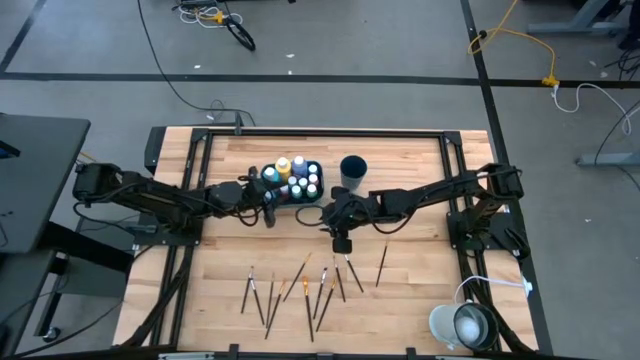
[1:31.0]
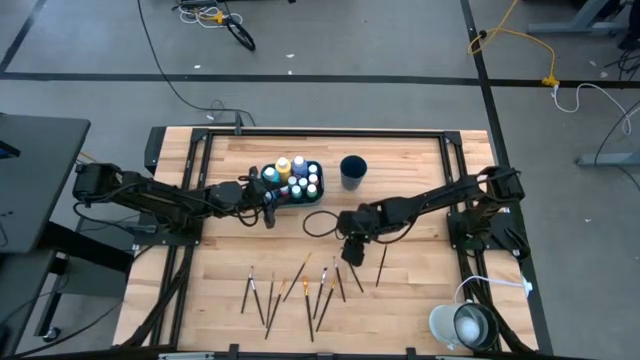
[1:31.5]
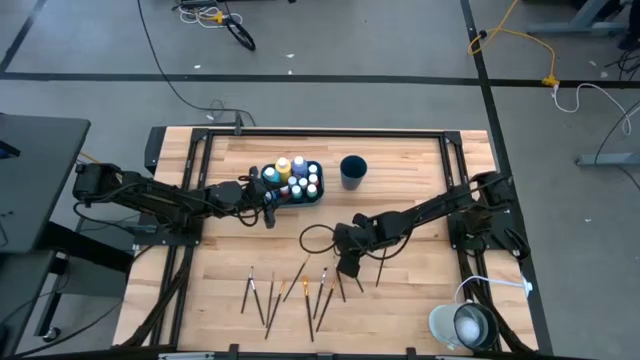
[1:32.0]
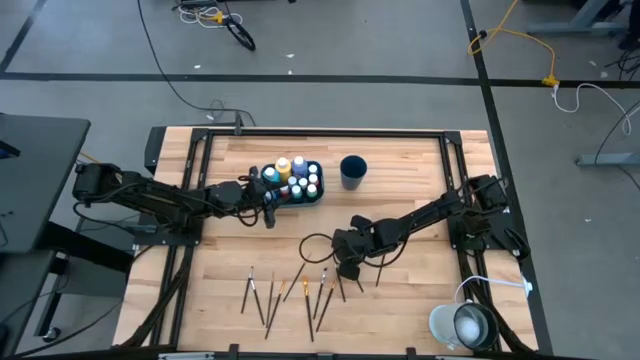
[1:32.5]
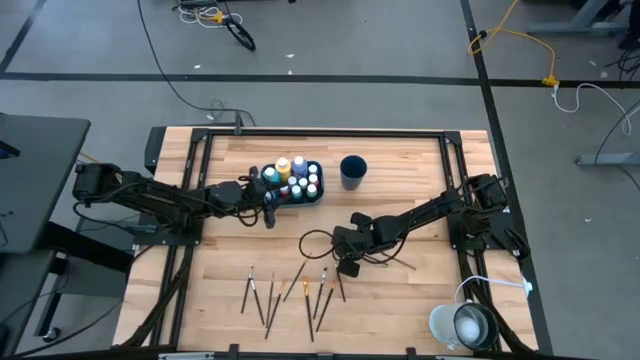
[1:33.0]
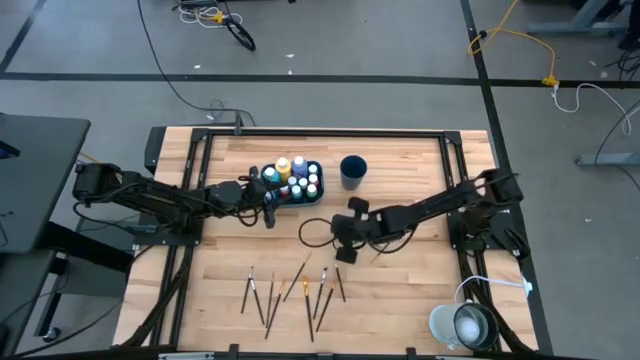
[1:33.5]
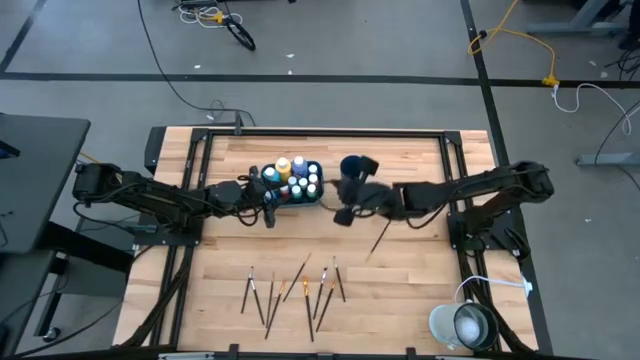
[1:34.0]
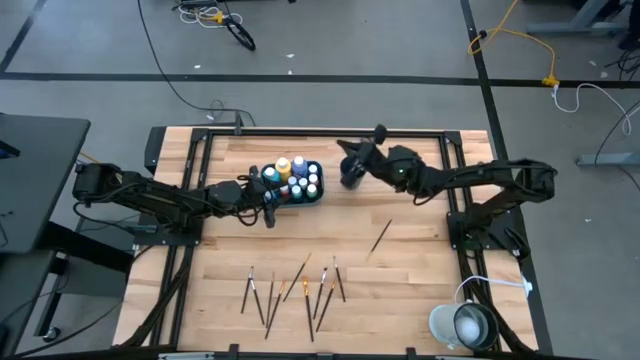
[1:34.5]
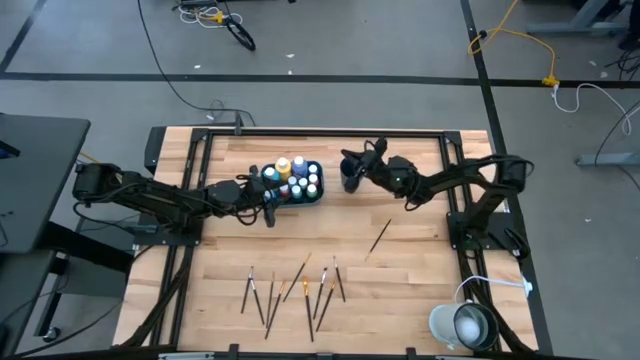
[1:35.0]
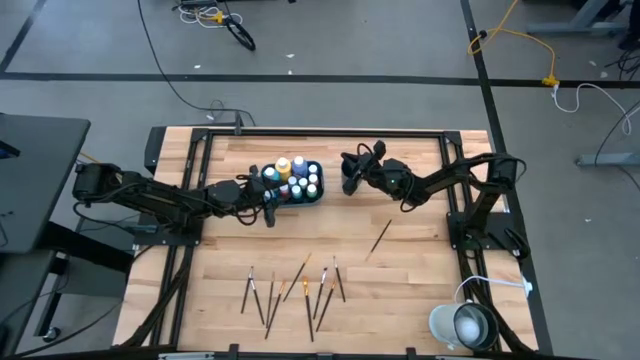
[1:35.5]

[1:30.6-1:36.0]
Task: Pick & Place Paint Supplies
Put the silver paint brush into the blue cup

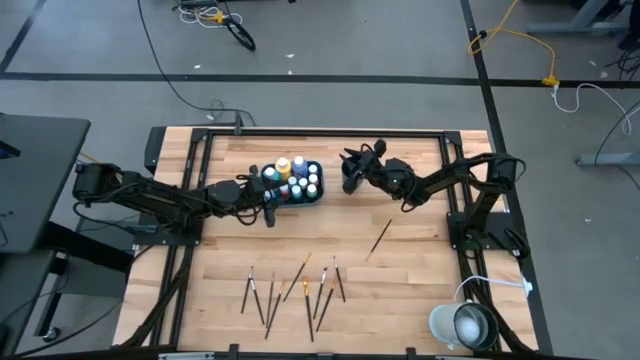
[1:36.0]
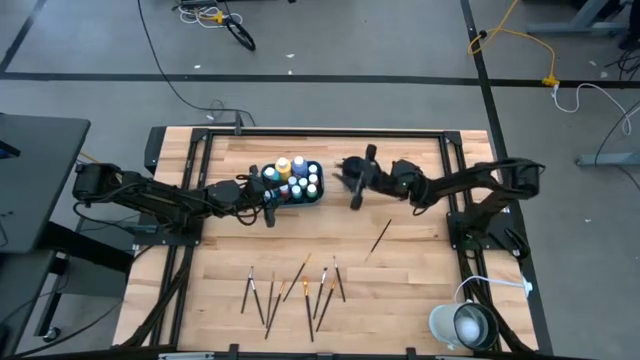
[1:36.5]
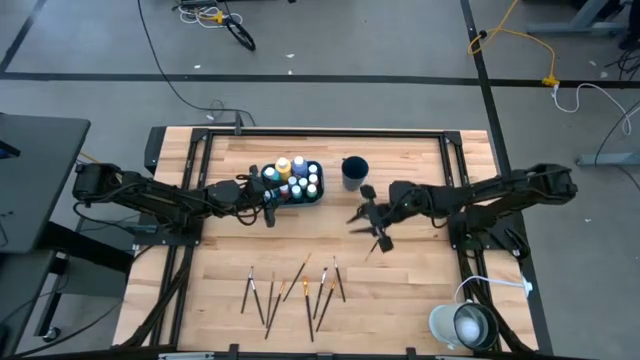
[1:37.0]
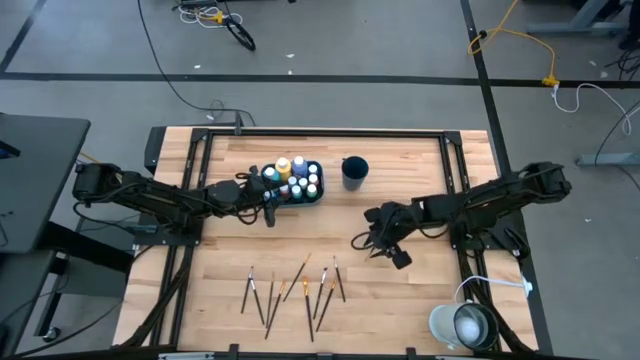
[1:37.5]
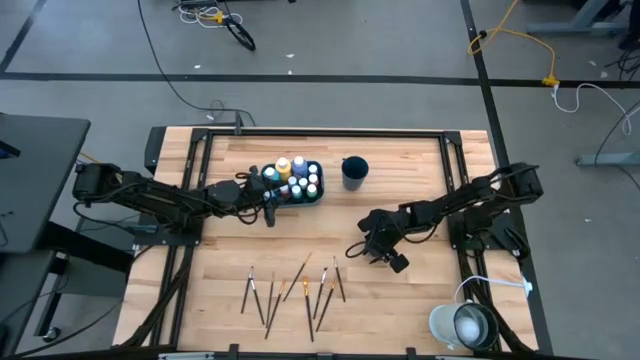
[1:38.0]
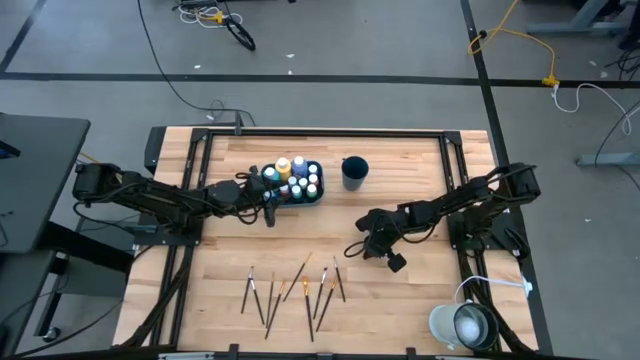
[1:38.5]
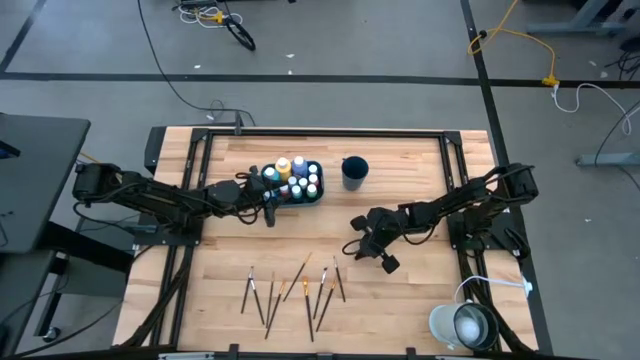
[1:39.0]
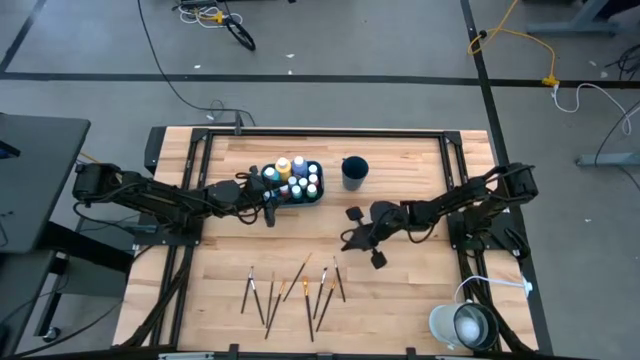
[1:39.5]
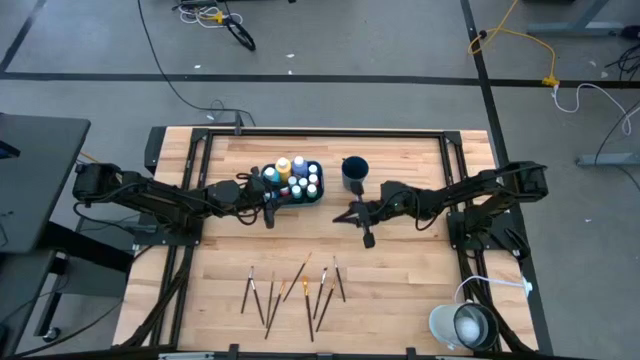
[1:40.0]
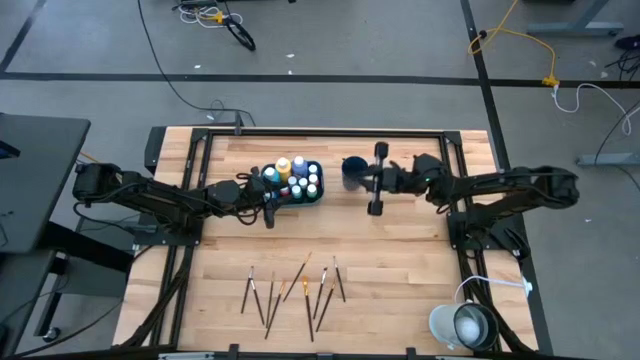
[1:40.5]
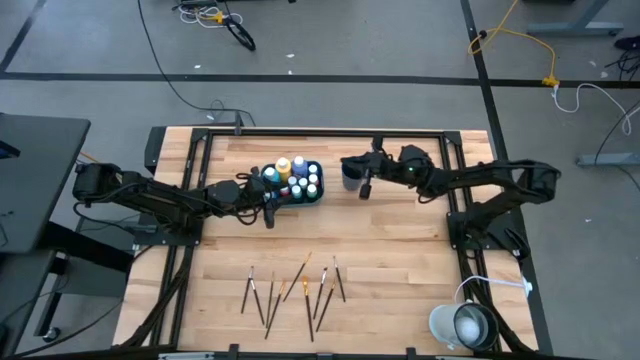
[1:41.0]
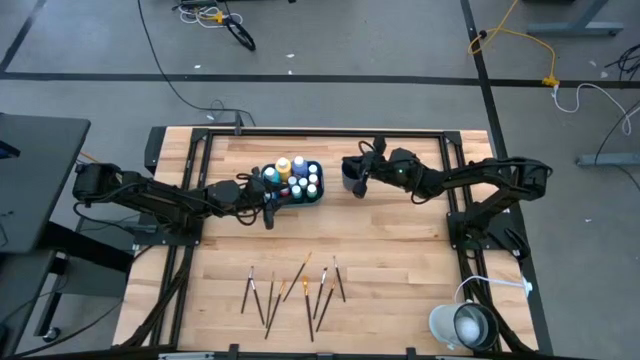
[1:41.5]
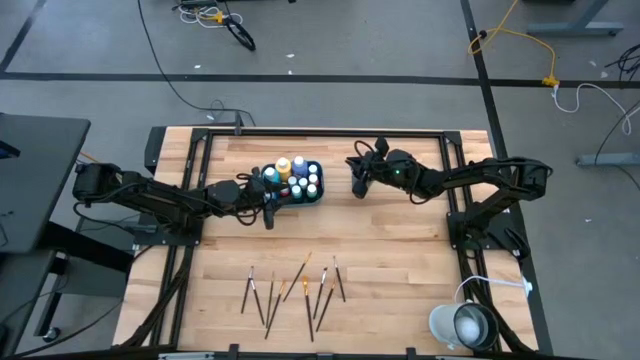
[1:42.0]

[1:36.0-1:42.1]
Put the gold paint brush into the blue cup

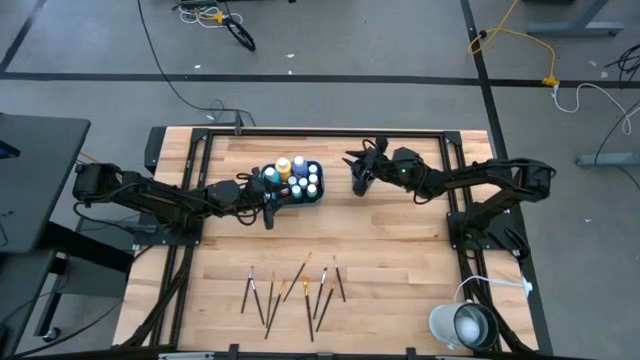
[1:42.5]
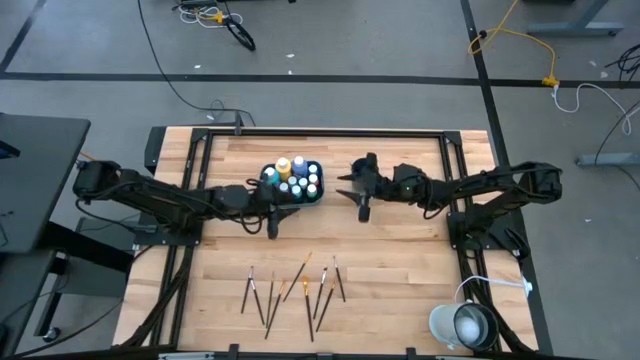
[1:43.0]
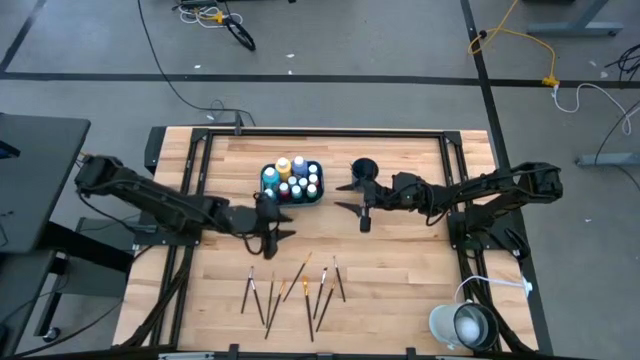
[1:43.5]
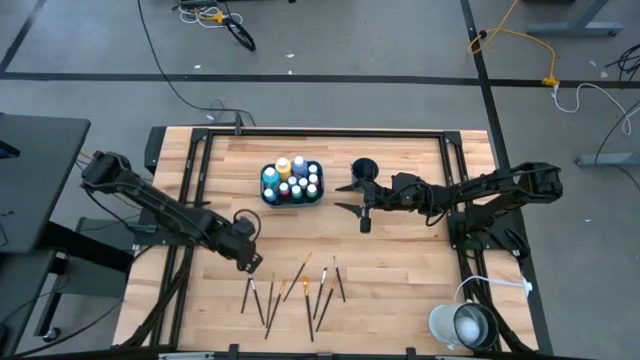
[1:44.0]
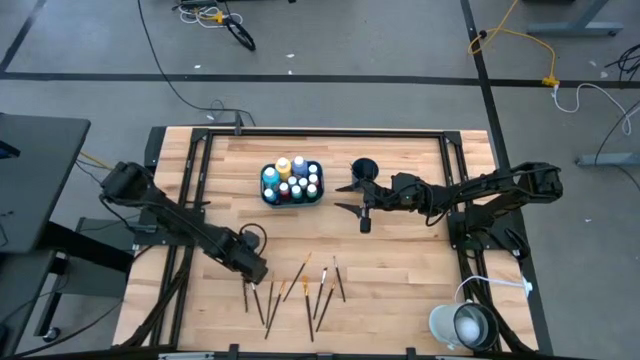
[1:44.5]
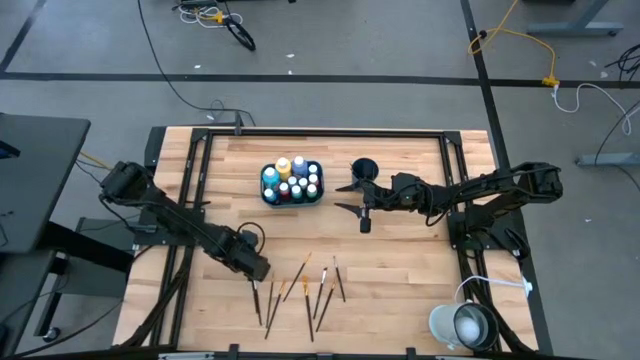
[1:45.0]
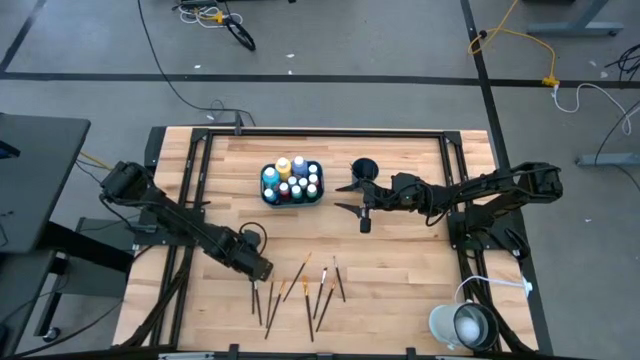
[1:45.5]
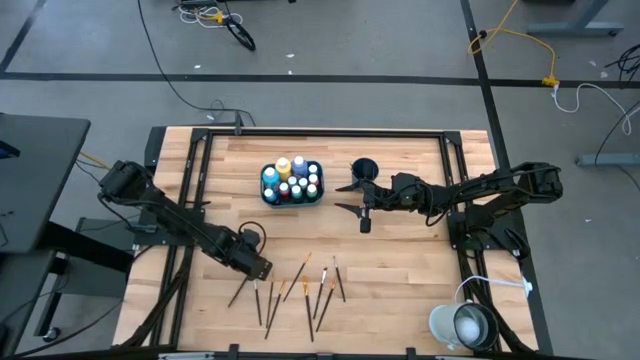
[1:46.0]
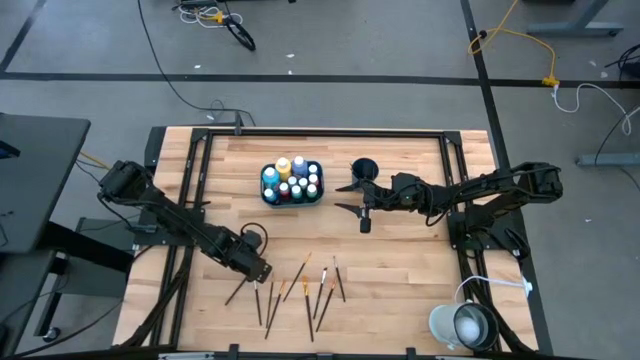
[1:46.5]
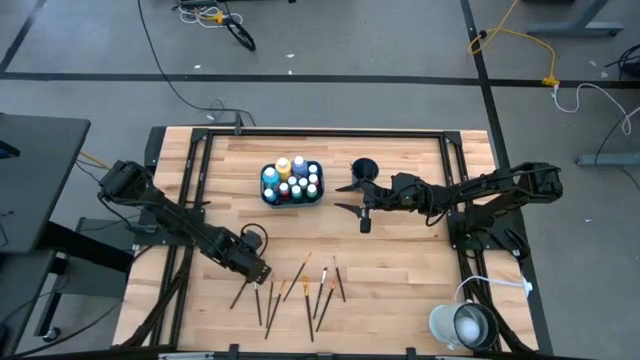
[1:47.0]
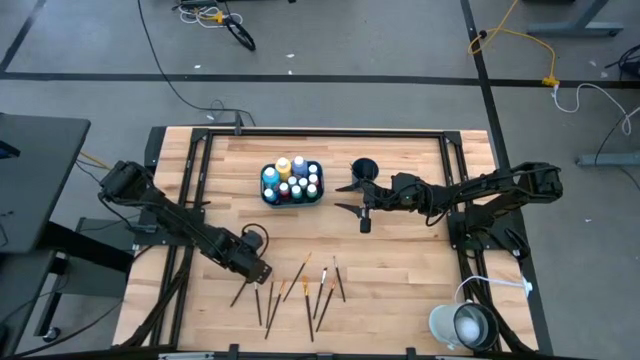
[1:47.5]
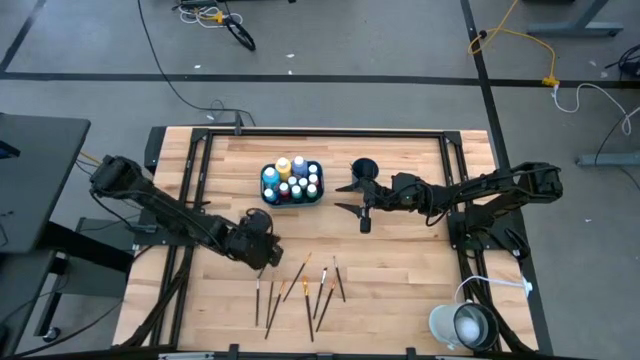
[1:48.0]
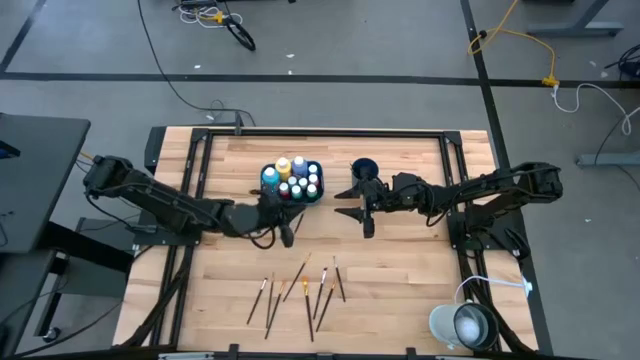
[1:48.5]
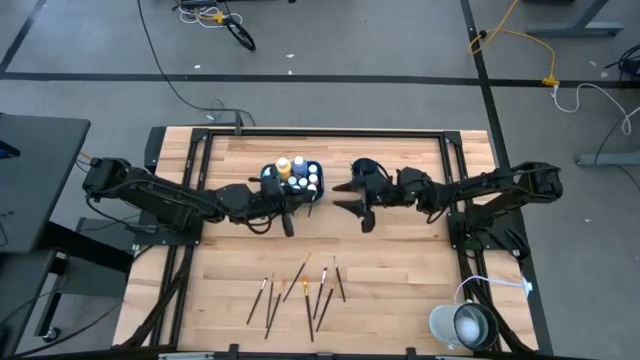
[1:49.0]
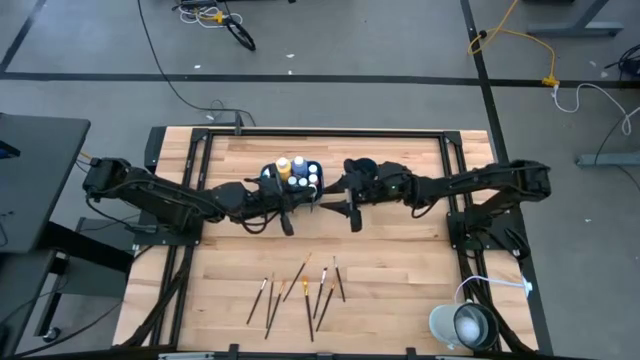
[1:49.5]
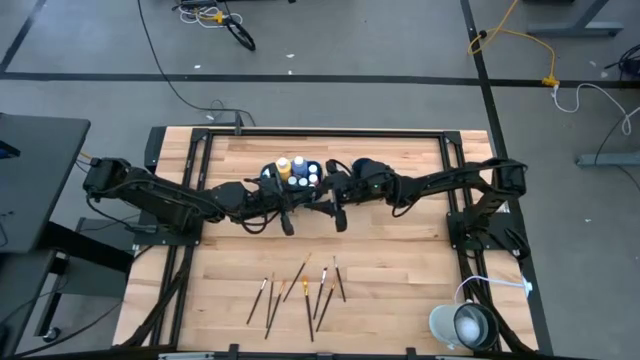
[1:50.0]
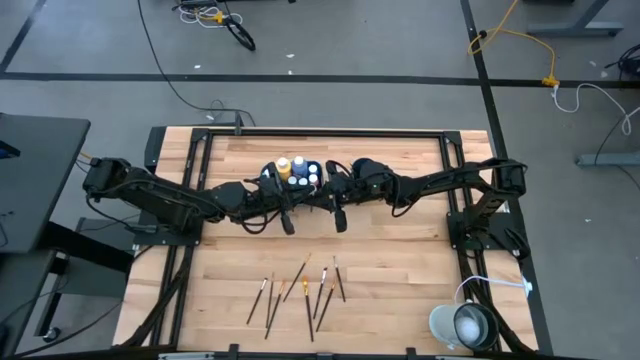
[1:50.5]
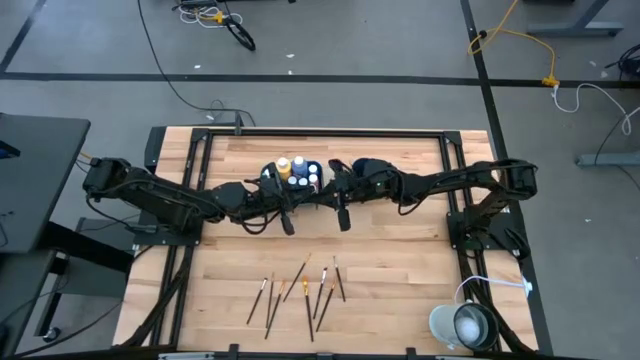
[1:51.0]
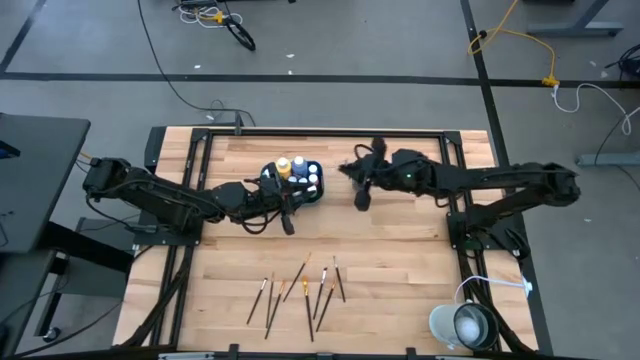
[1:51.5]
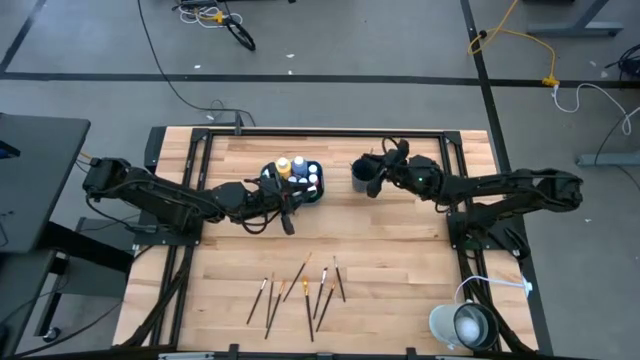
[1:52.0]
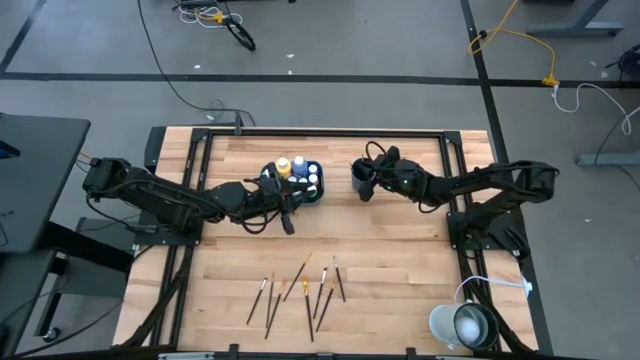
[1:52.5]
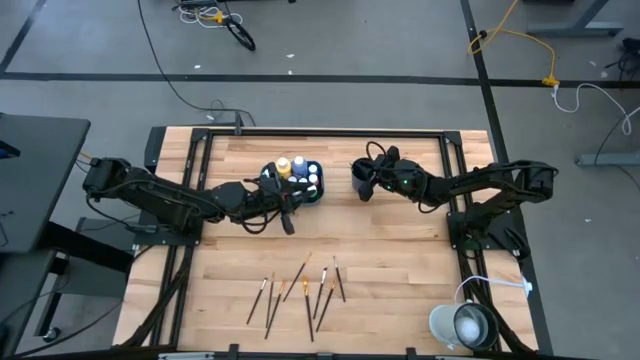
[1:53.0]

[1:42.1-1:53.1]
Put the silver paint brush into the blue cup
